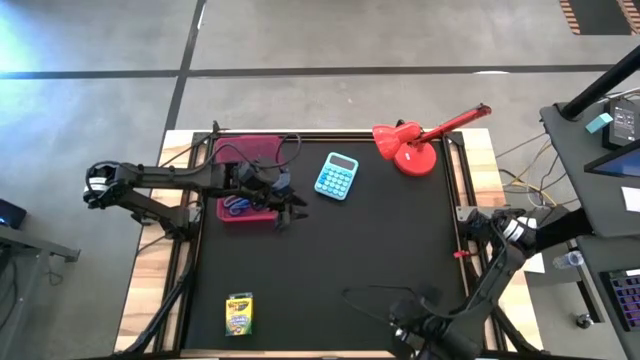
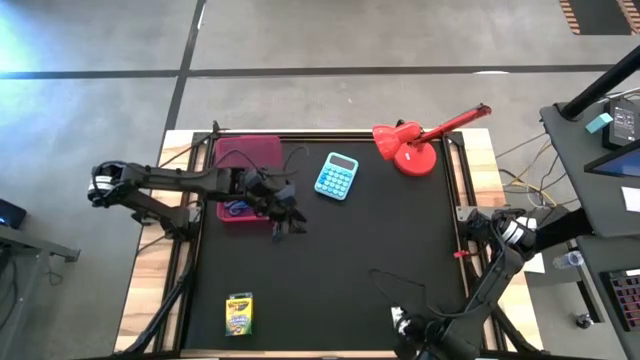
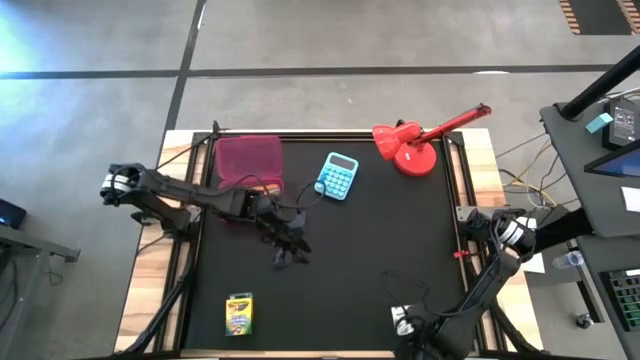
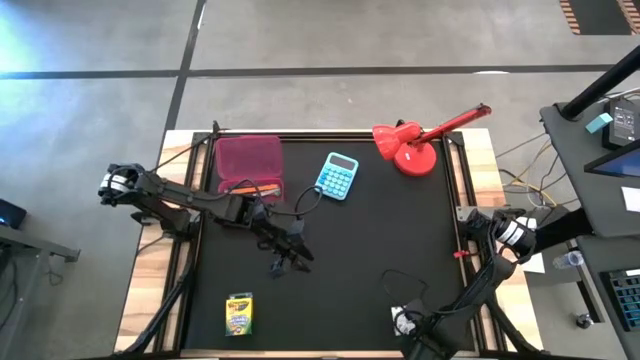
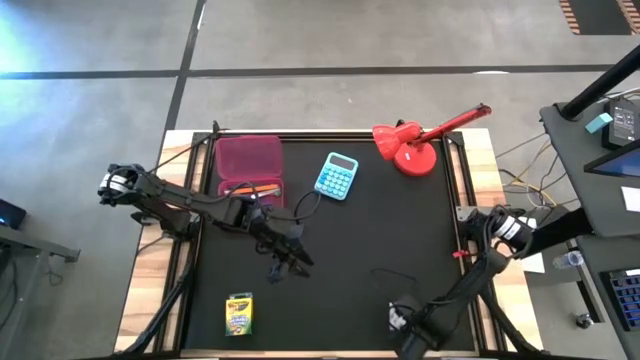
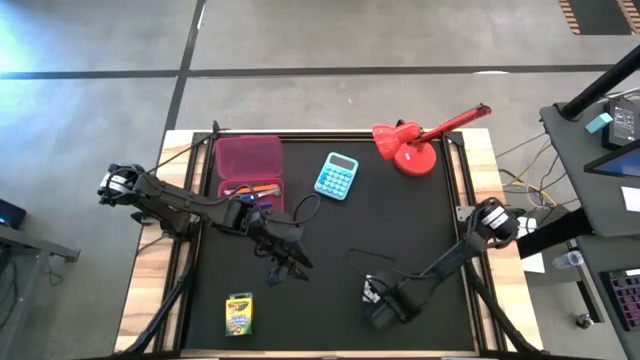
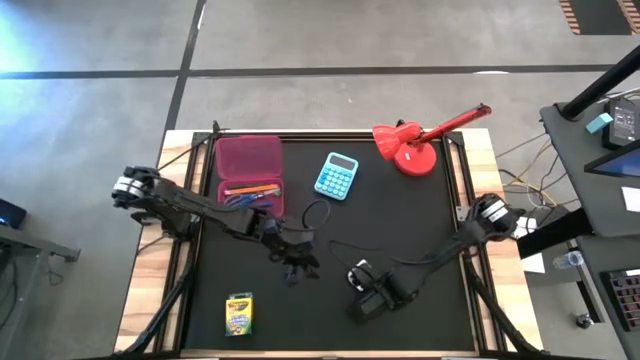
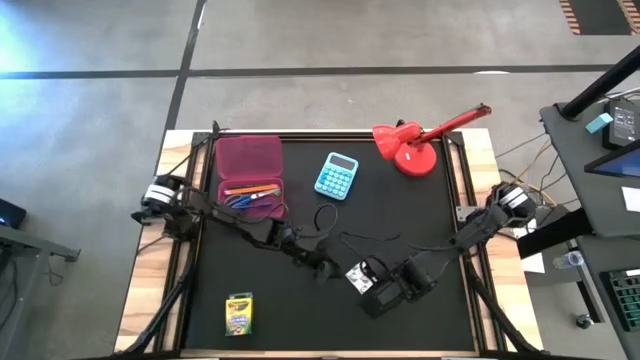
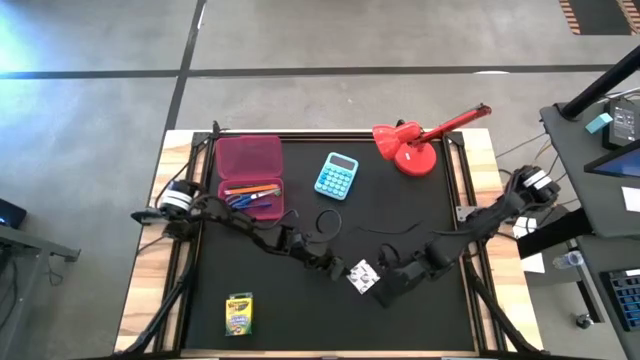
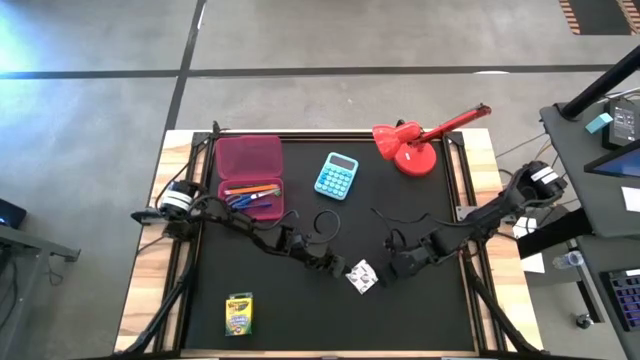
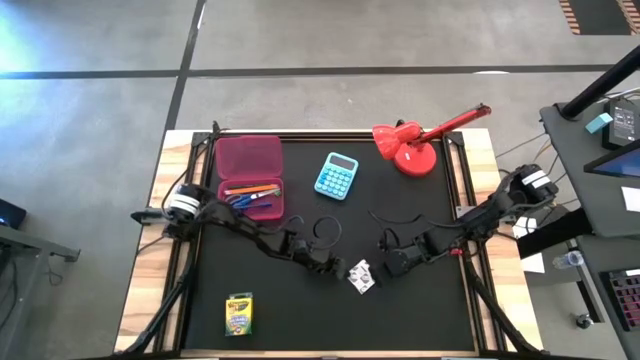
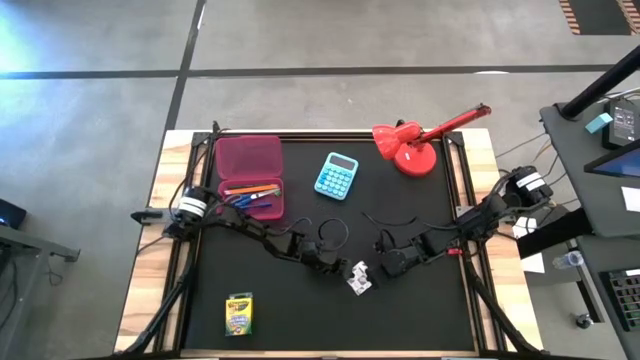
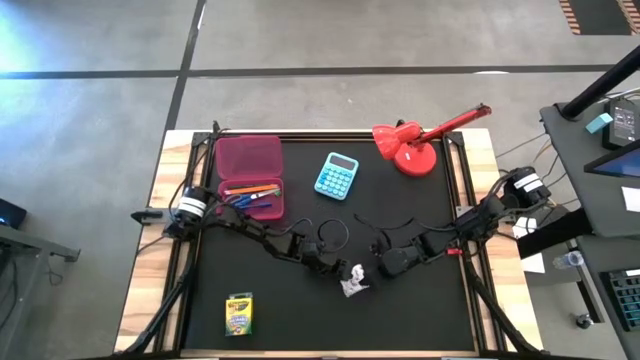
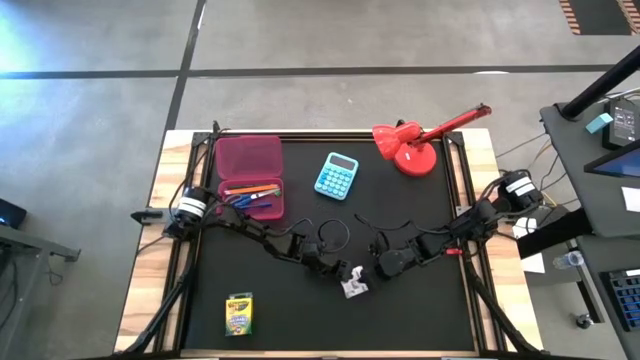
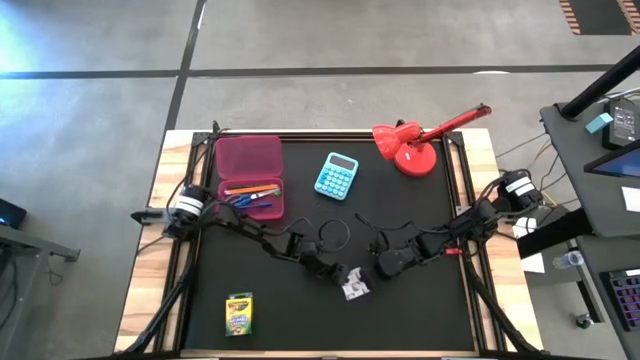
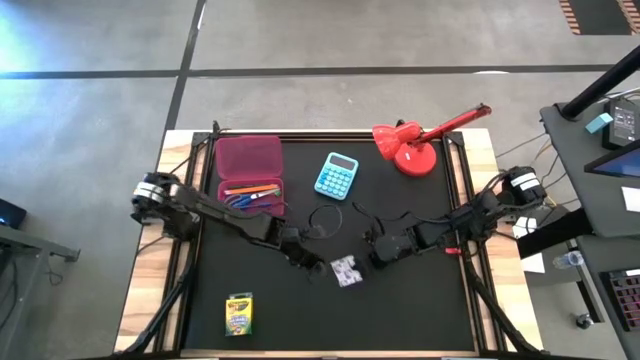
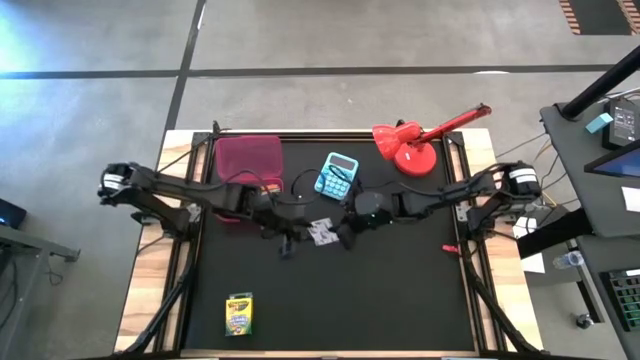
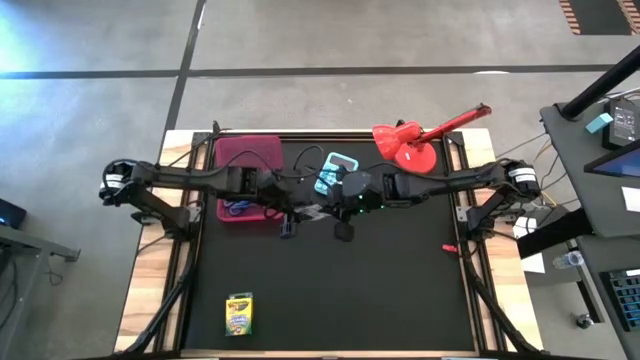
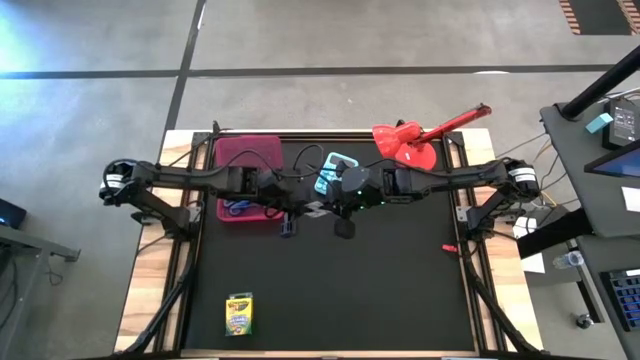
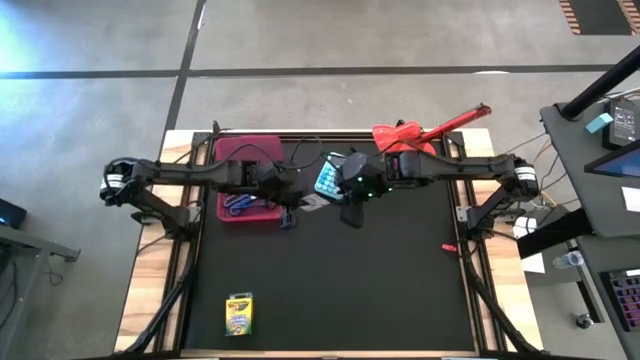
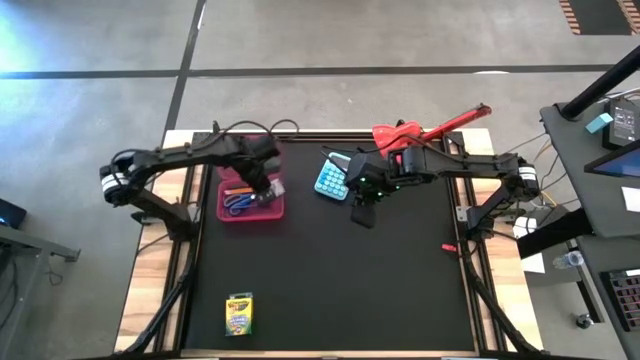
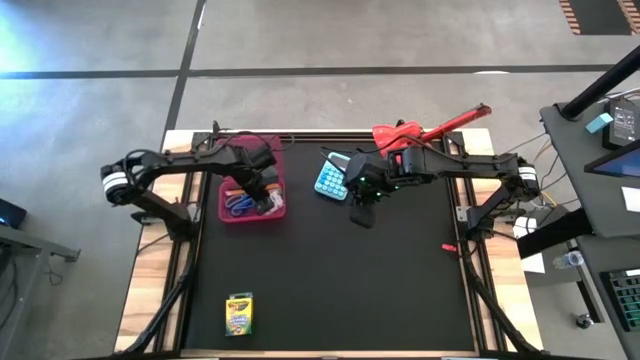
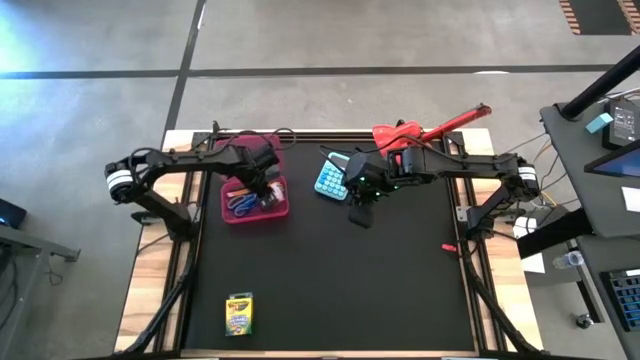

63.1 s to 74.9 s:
Task: Pack school essentials
Put the violet sticky notes into the red supply box

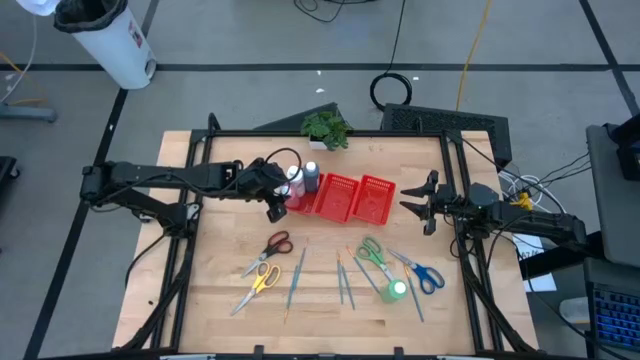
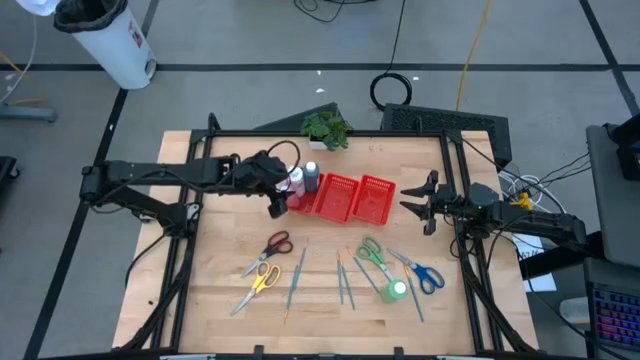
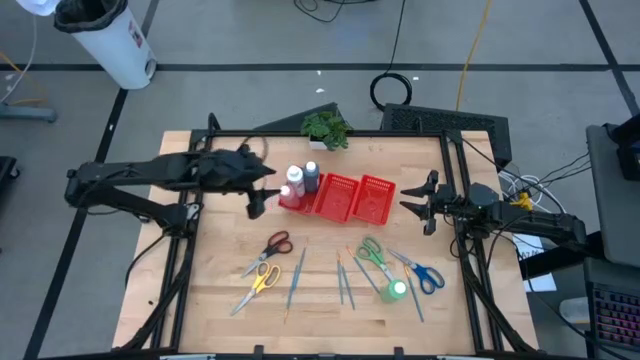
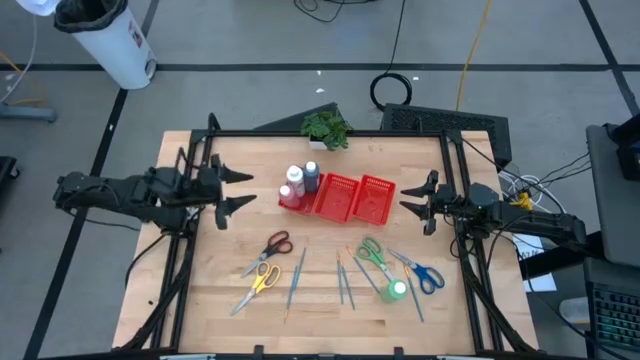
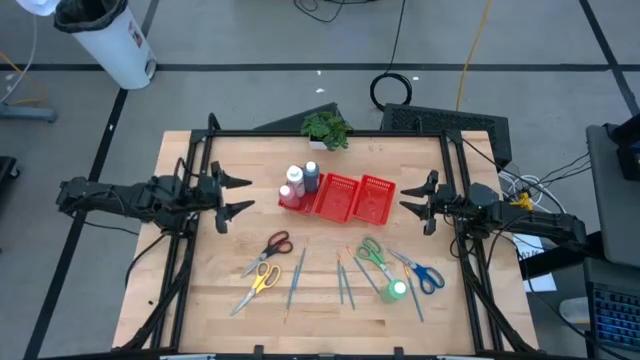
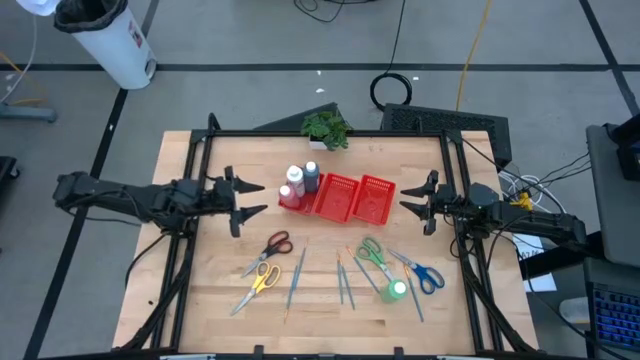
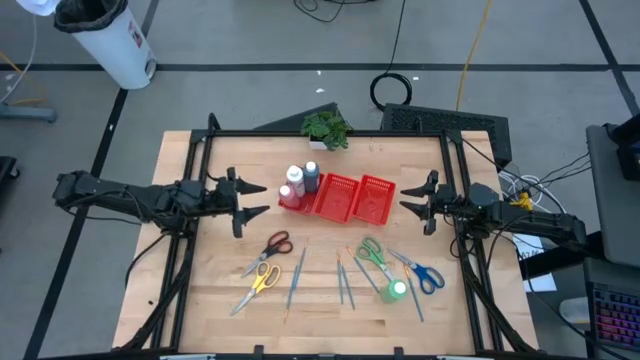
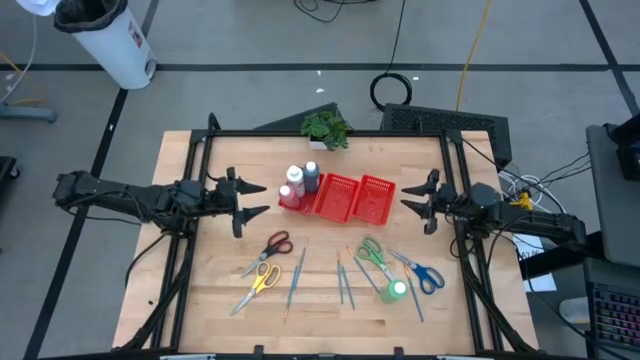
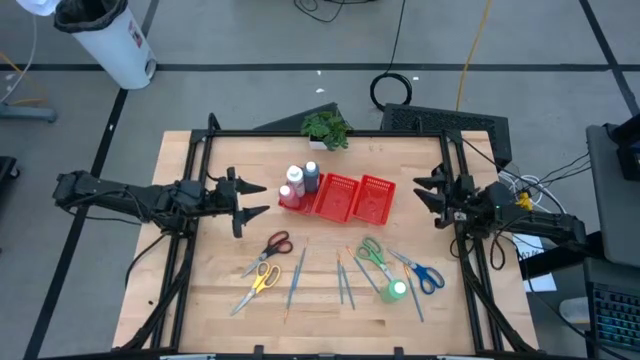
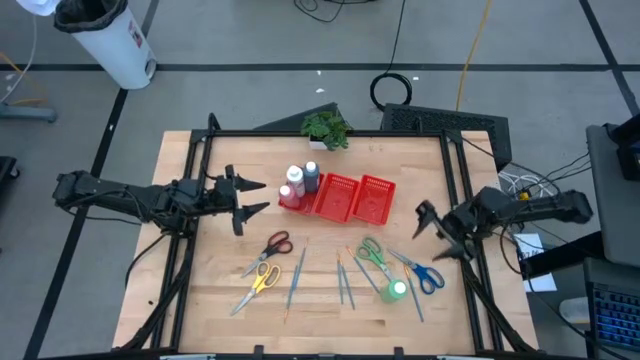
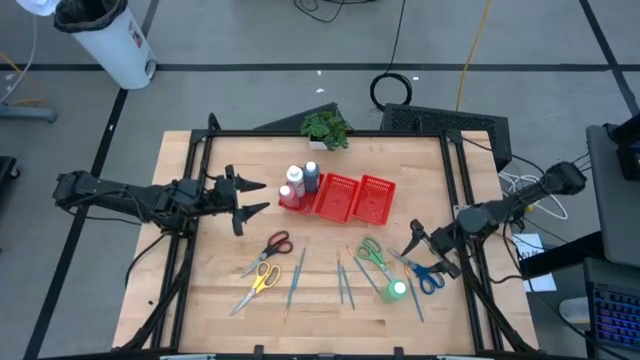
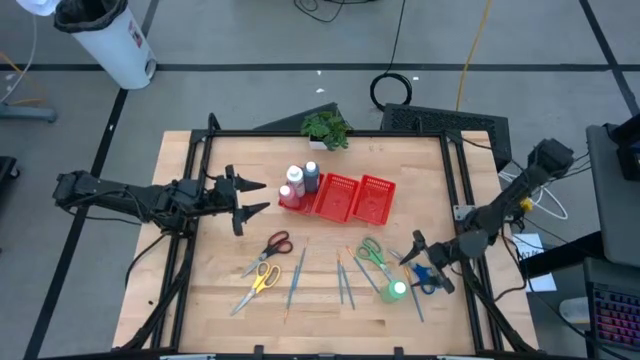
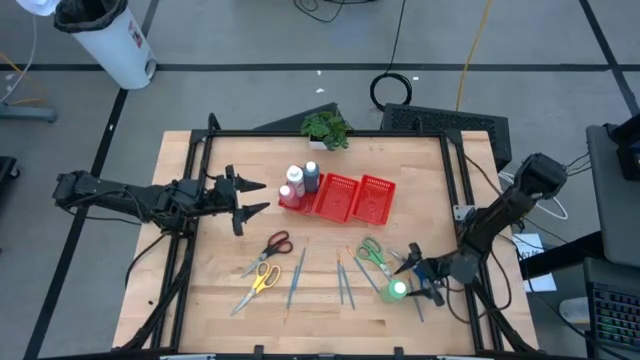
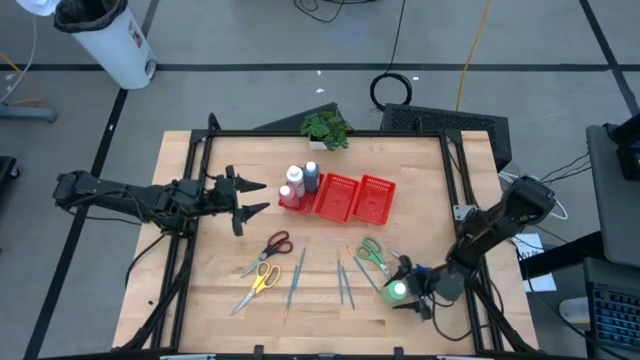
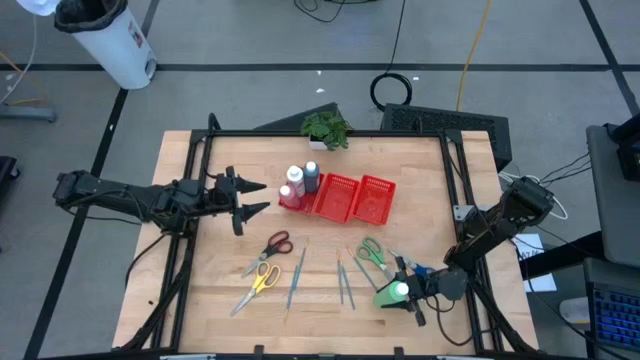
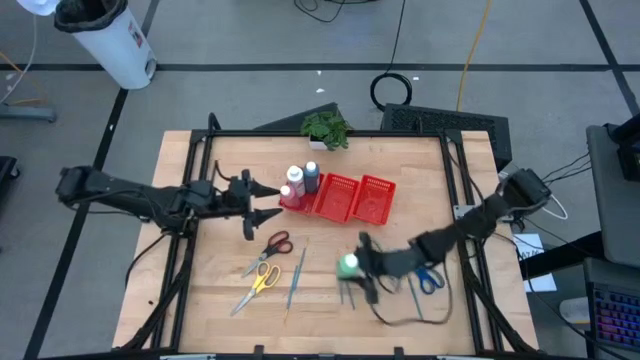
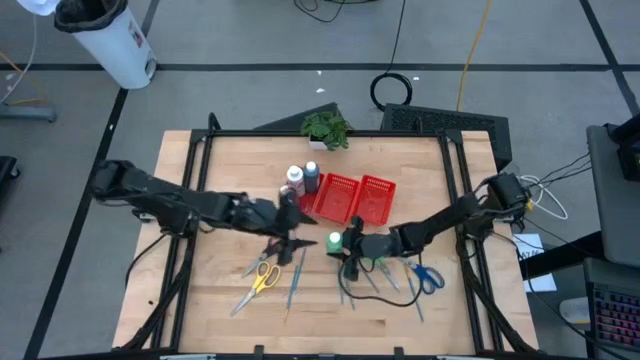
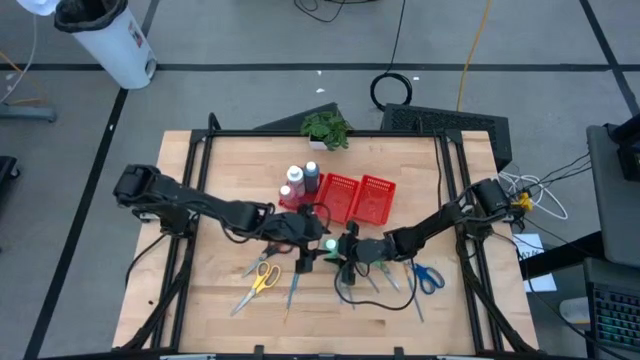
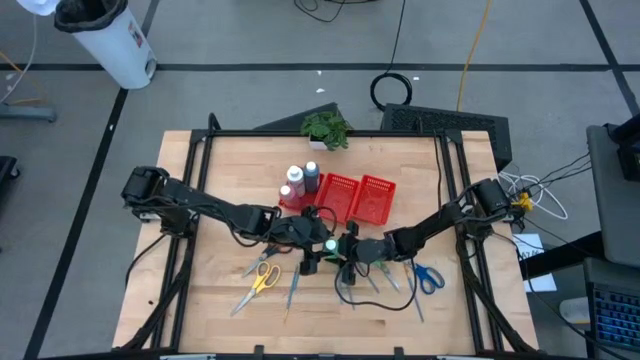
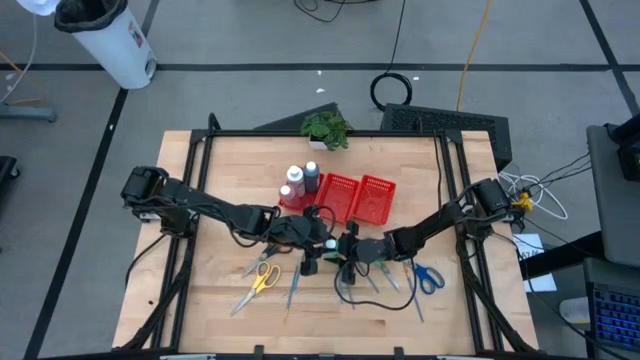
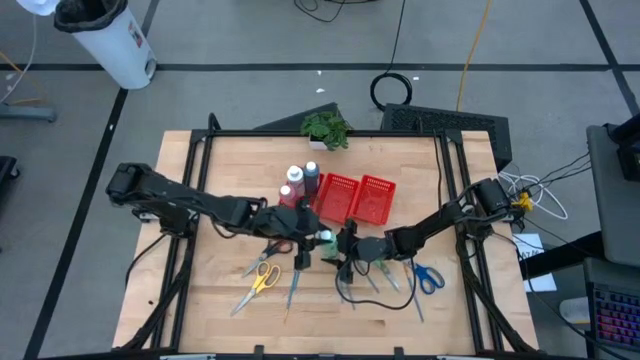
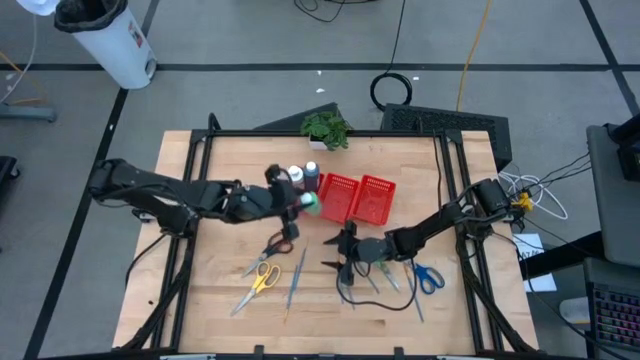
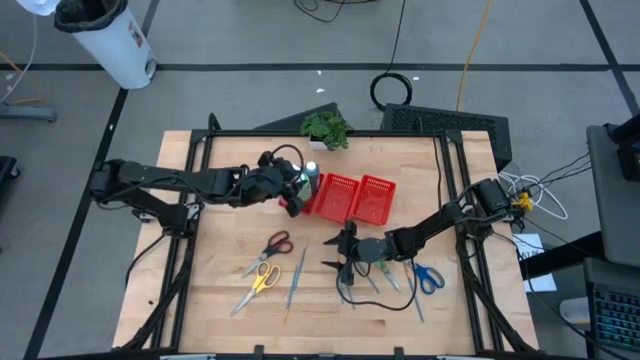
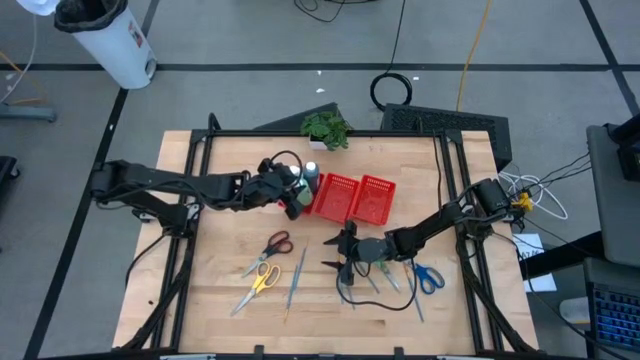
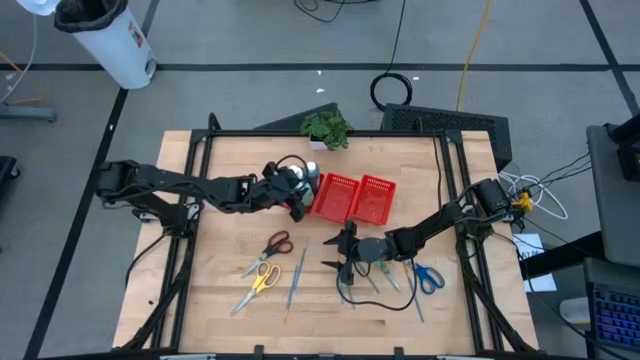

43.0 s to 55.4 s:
Task: Pick & Place Paint Supplies
Put the green paint bottle into the left red bin
